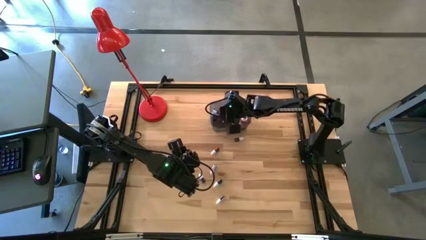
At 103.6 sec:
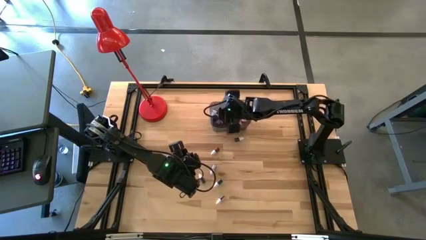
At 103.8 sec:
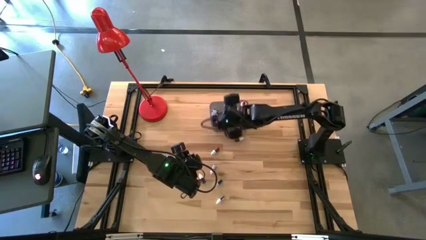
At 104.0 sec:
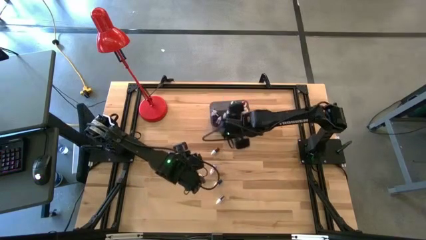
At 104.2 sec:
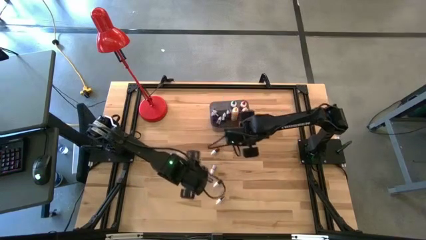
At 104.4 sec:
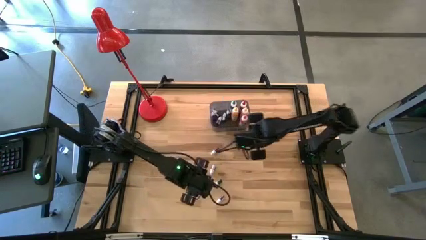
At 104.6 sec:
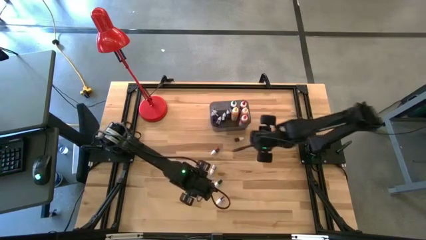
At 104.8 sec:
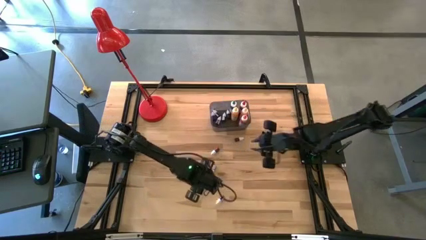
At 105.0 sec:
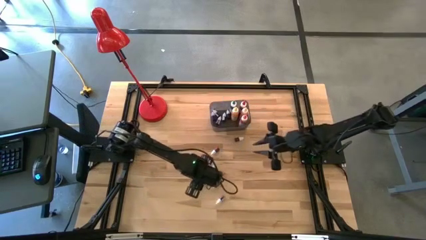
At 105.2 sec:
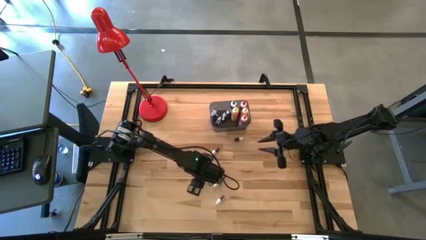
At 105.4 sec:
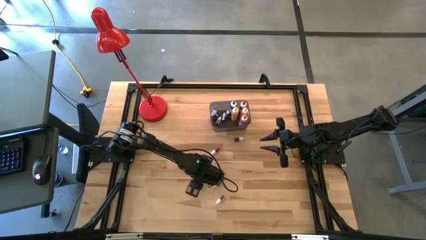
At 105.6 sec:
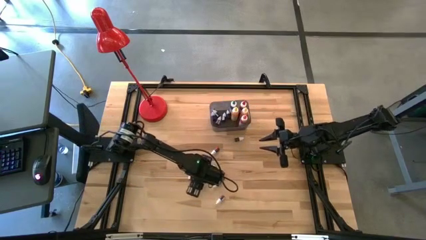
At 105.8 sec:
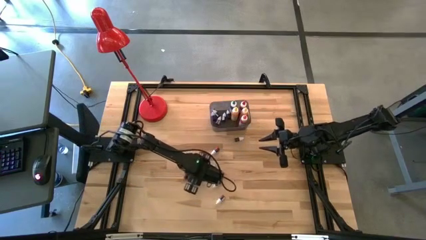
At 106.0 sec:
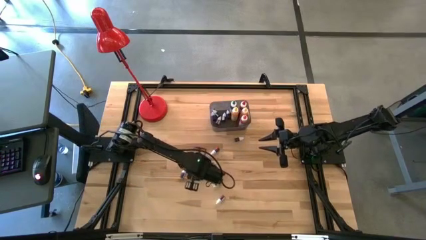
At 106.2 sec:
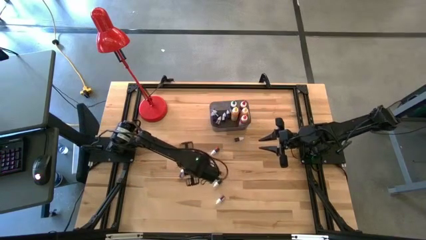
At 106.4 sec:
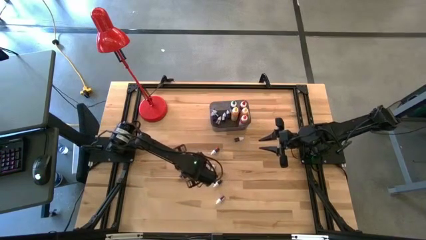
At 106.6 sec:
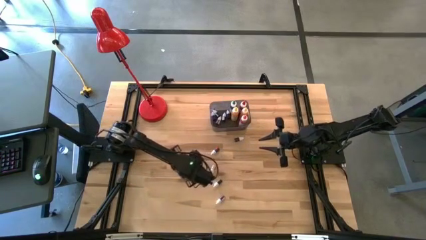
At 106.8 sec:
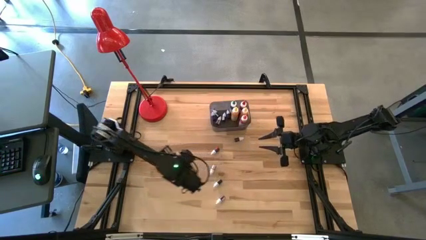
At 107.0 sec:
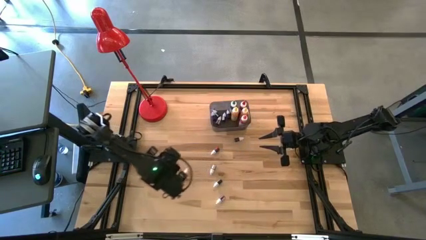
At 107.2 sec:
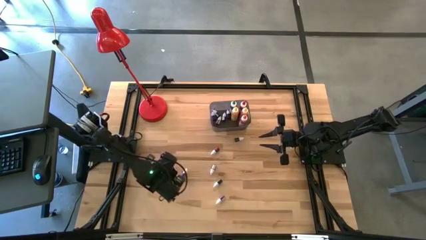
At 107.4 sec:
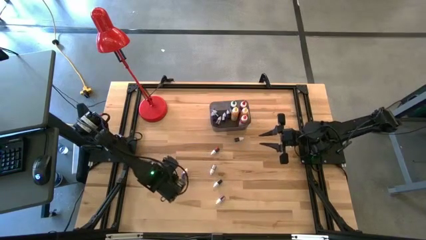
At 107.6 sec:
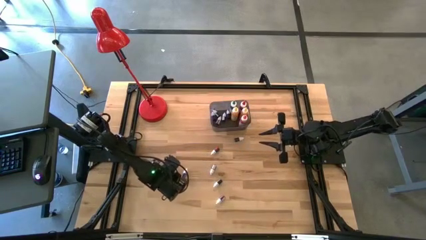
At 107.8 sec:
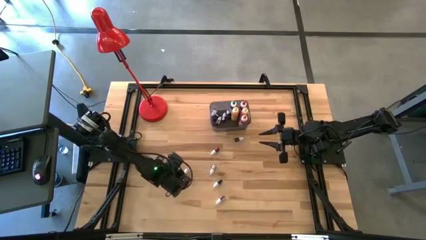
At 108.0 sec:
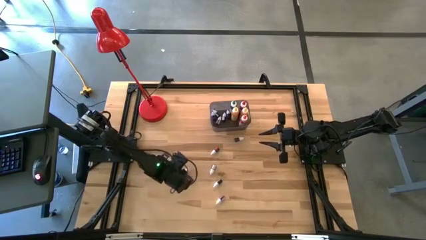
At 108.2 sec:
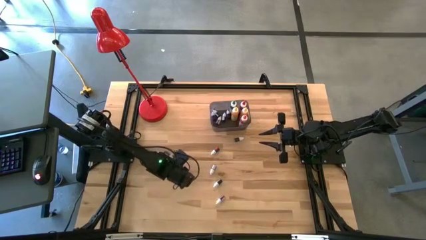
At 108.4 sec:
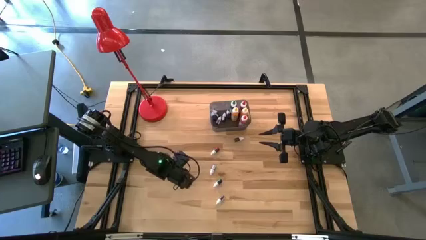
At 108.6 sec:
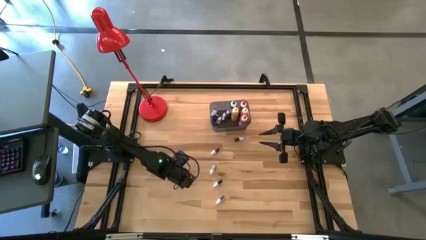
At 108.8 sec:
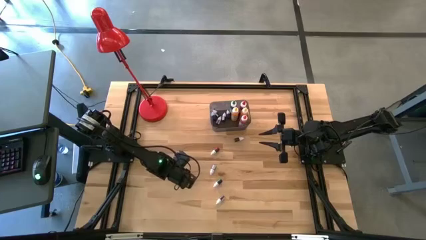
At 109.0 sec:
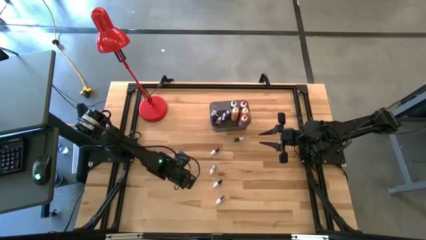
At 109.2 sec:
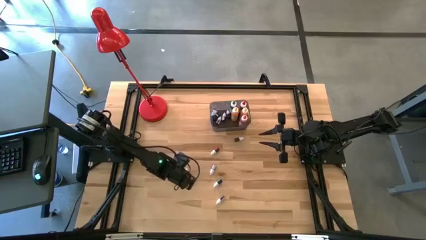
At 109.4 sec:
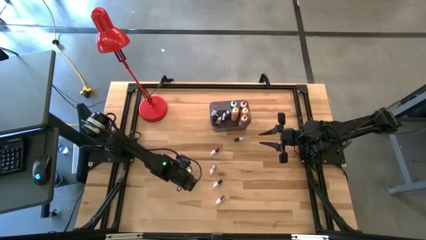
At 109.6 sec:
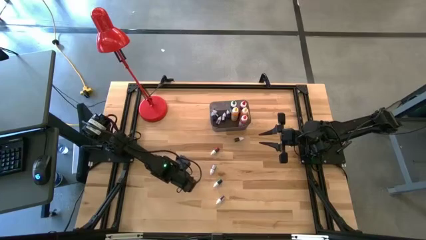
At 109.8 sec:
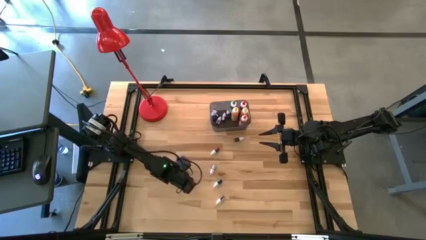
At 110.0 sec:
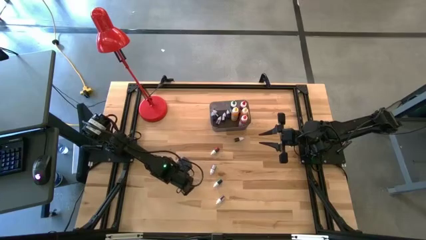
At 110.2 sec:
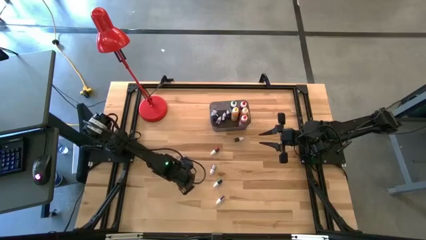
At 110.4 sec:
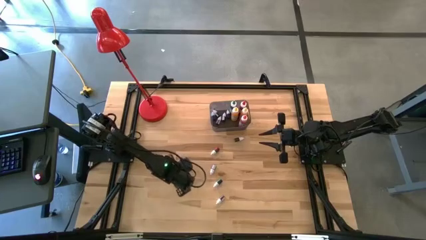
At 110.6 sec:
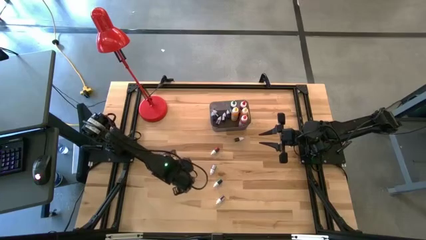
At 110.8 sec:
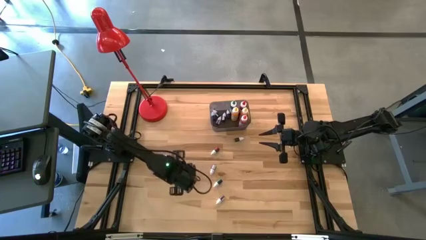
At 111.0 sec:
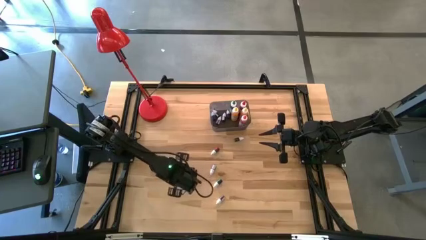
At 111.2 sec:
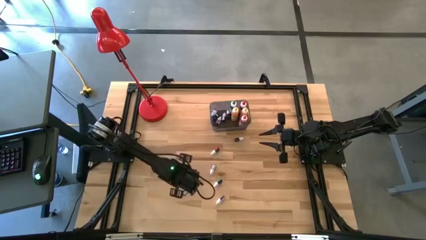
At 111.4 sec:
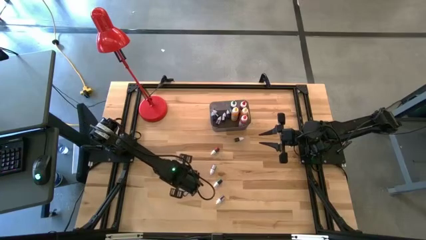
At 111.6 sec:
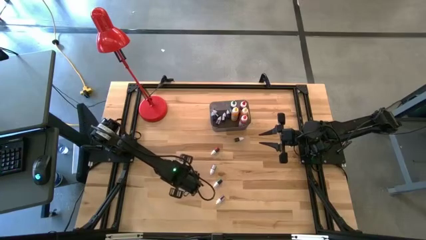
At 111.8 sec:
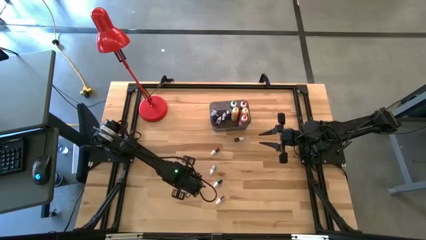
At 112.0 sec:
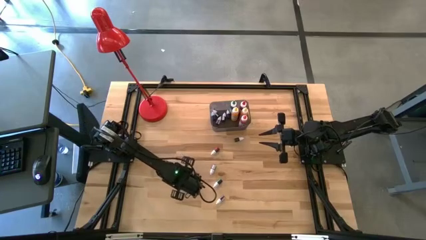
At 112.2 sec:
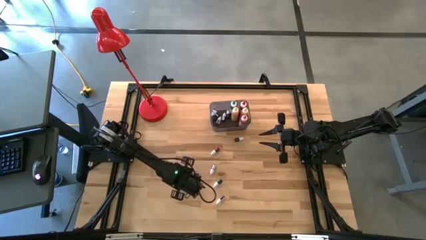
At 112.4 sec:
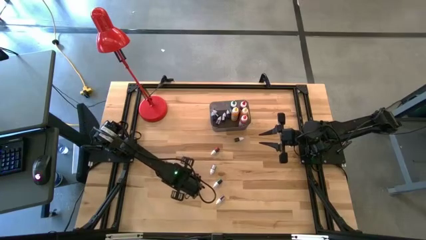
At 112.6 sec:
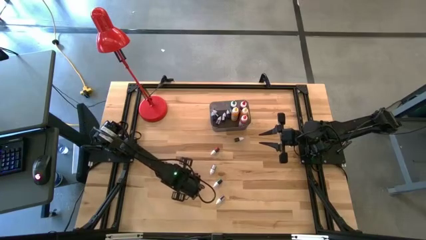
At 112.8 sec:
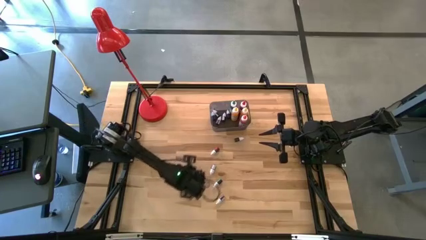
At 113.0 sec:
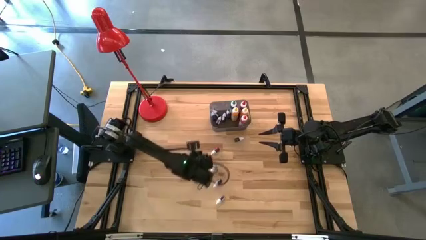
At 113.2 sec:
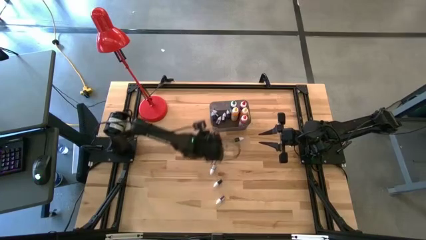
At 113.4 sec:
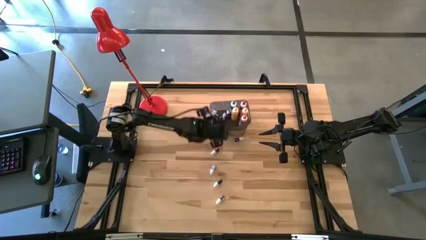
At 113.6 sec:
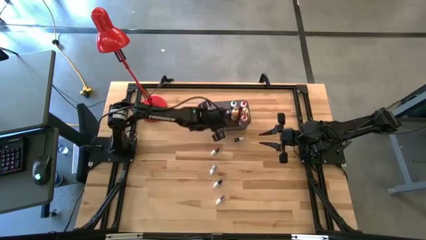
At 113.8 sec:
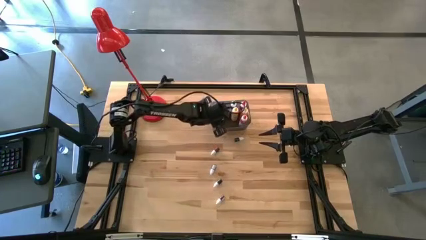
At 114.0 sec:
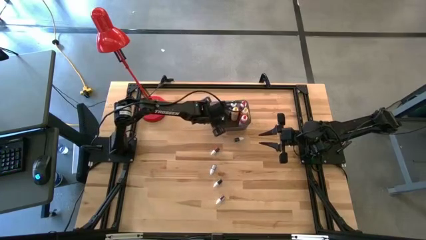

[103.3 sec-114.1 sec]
Task: Pick & Place food coloring
Put the small dark blue food coloring bottle into the black bin

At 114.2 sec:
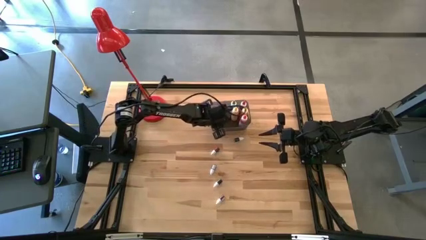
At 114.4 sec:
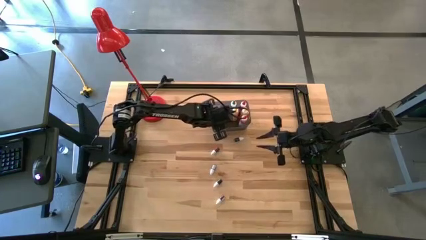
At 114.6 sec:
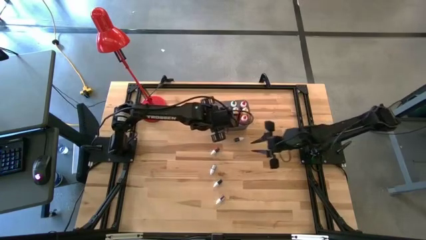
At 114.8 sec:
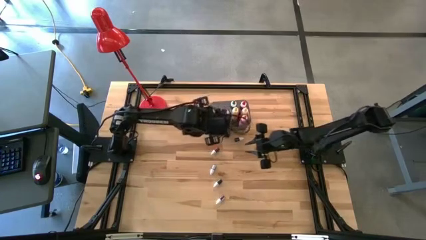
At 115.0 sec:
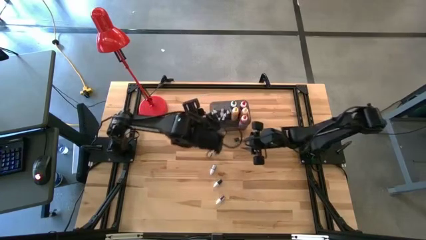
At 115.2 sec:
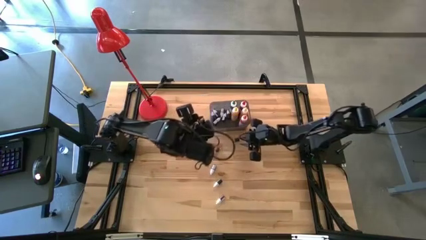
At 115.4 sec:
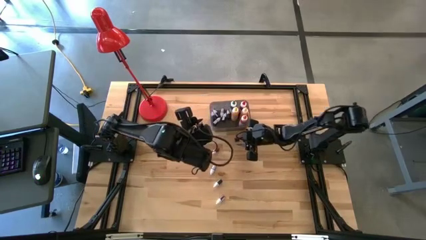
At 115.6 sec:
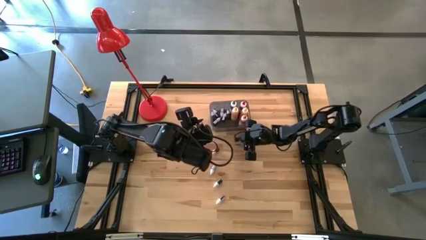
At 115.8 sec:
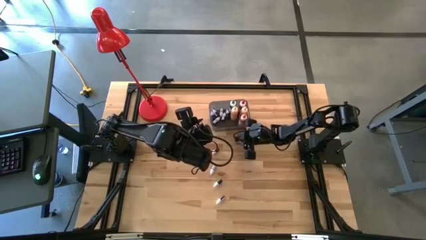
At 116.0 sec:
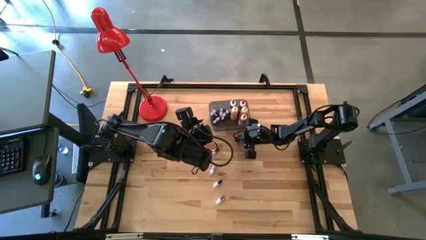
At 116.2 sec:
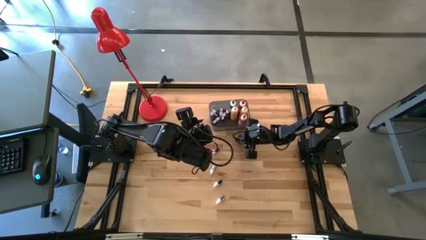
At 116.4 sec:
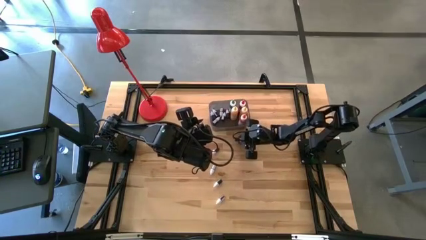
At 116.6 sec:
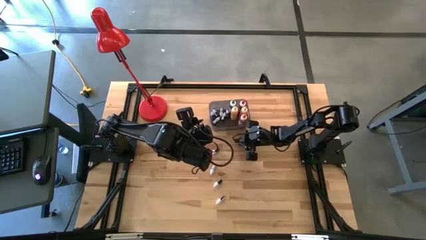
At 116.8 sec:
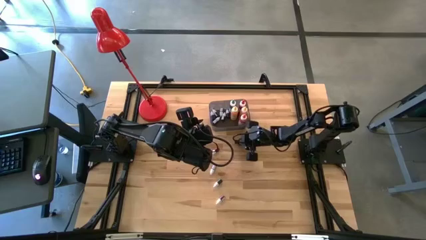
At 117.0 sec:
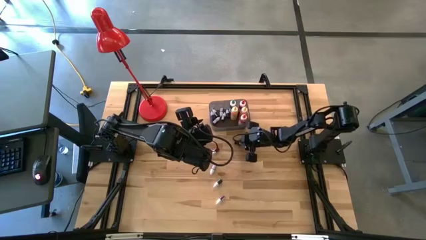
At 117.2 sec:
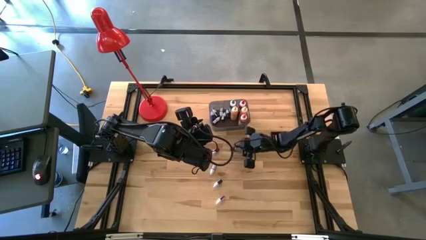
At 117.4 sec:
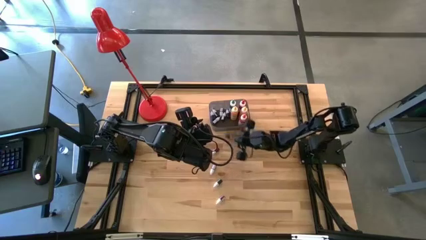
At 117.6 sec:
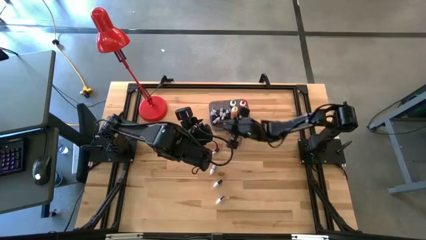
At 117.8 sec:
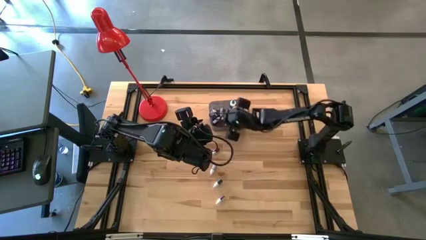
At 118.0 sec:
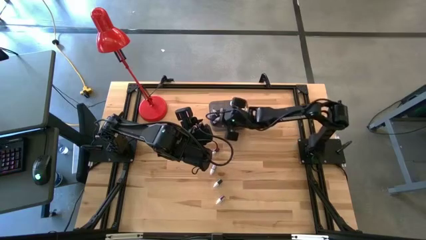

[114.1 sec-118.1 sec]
Put the small black food coloring bottle into the black bin

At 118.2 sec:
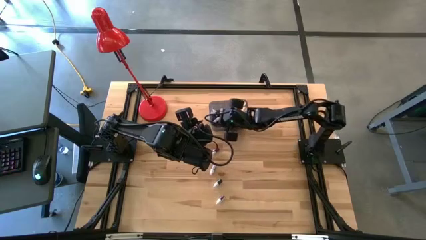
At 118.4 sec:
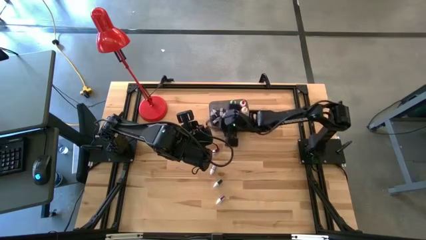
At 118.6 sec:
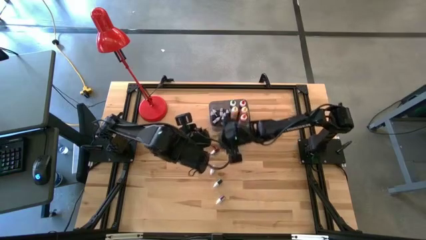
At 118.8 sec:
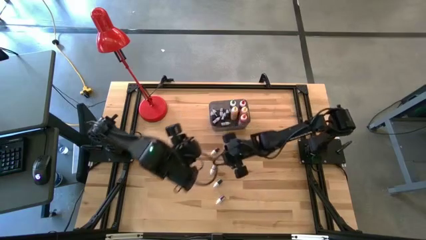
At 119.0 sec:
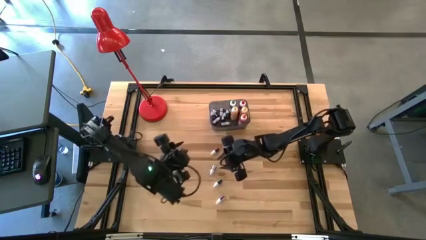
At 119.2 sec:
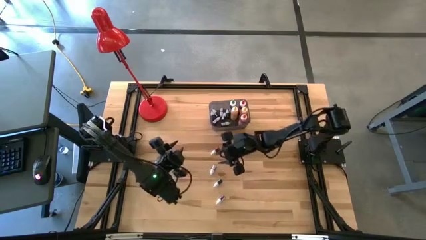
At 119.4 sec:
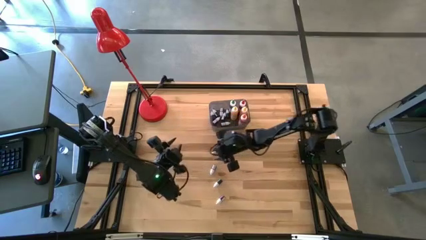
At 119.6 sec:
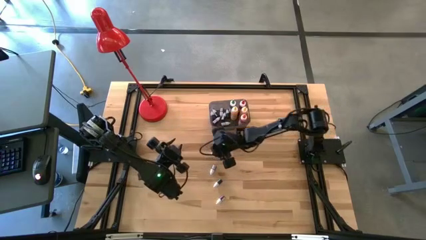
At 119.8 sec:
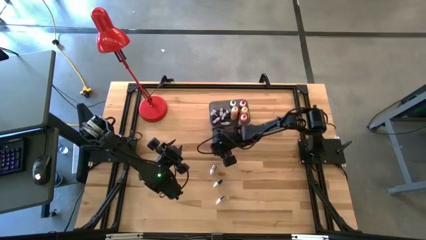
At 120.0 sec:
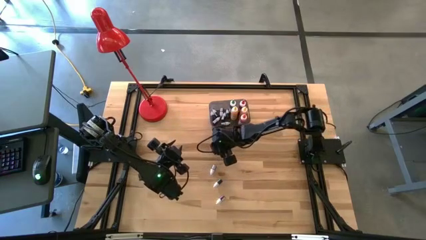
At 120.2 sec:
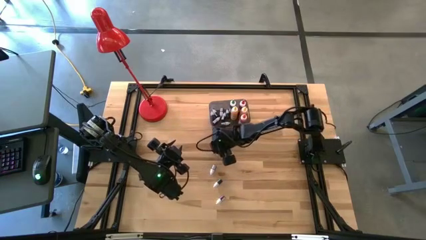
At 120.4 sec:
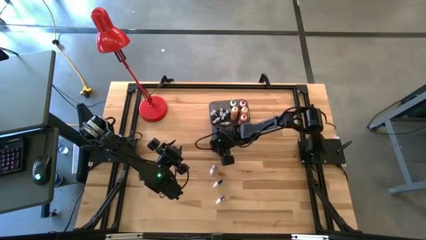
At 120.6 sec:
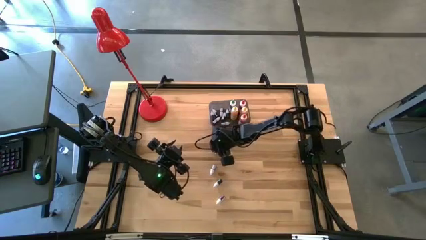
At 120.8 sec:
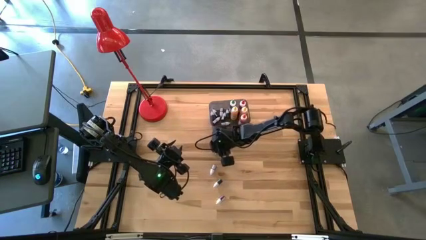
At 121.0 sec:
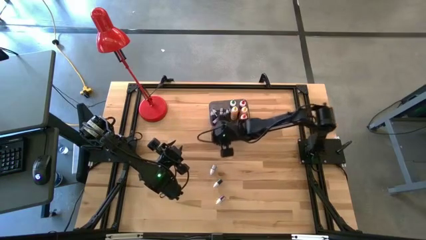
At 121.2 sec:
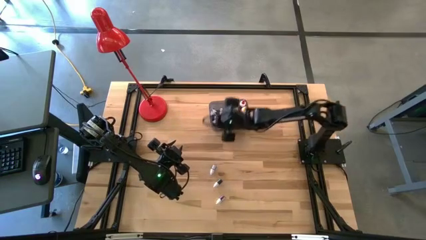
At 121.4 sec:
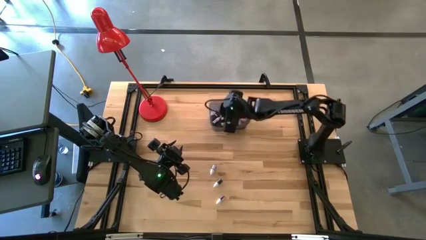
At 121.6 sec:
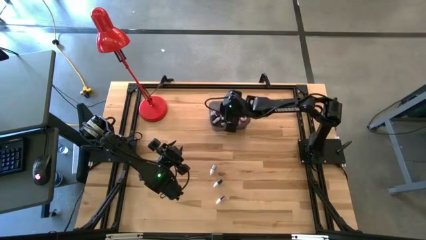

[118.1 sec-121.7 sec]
Put the small red food coloring bottle into the black bin
